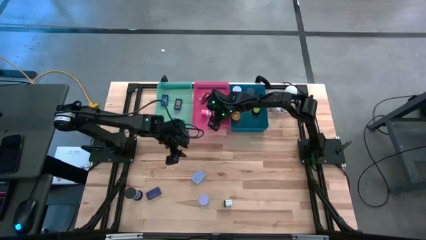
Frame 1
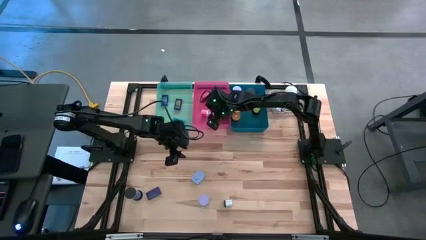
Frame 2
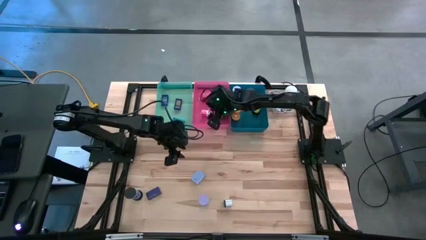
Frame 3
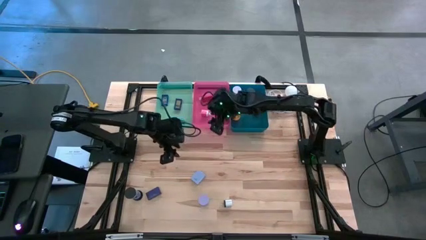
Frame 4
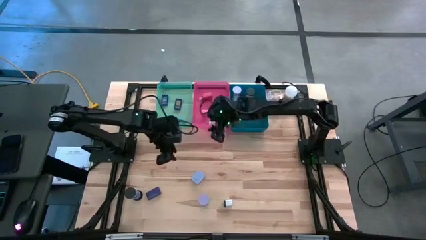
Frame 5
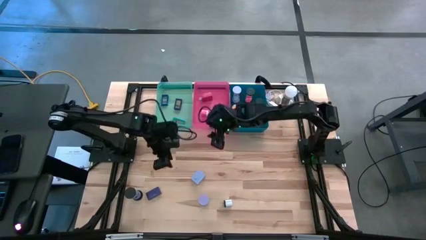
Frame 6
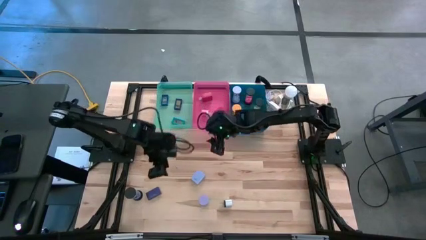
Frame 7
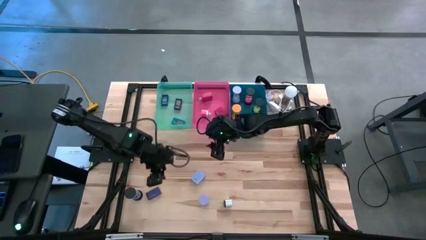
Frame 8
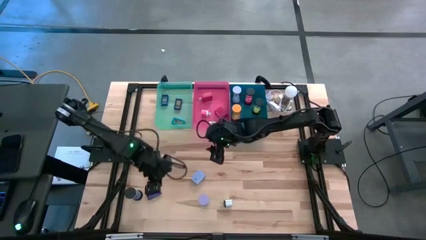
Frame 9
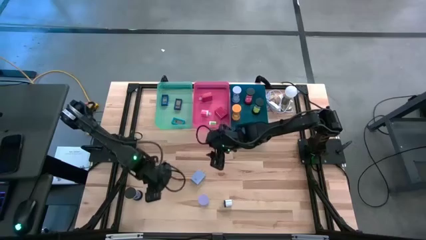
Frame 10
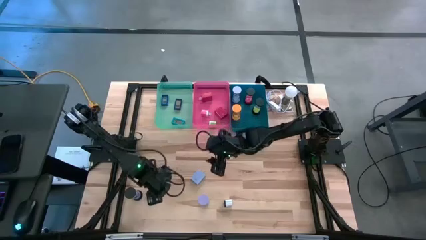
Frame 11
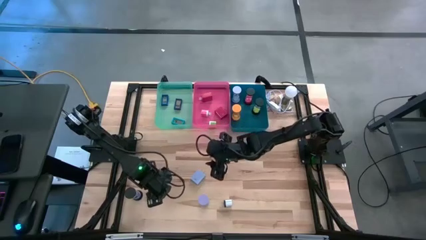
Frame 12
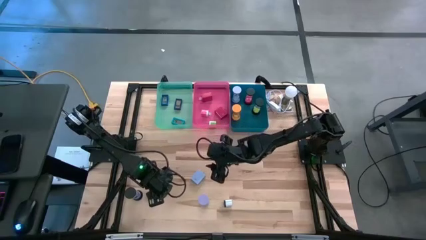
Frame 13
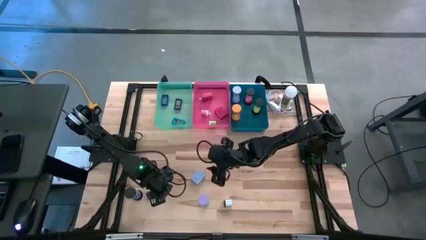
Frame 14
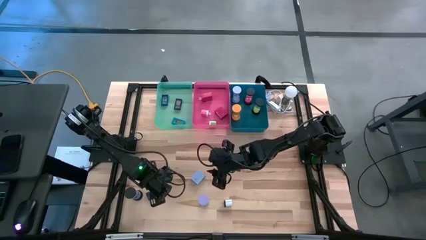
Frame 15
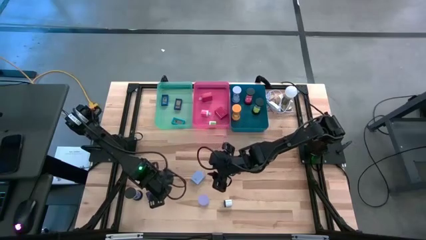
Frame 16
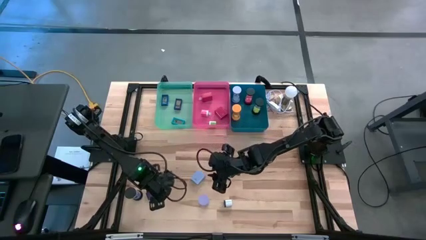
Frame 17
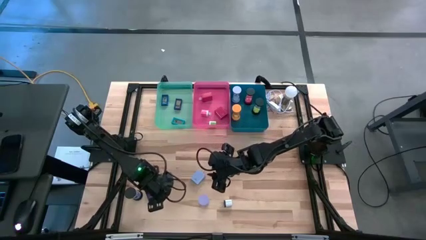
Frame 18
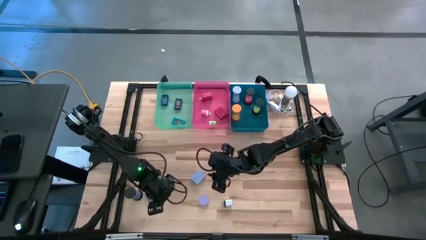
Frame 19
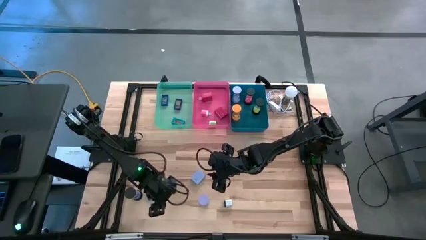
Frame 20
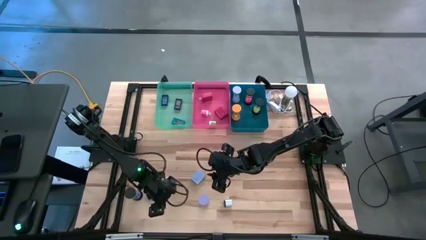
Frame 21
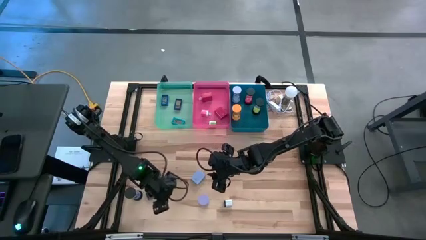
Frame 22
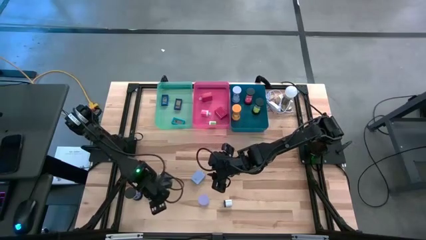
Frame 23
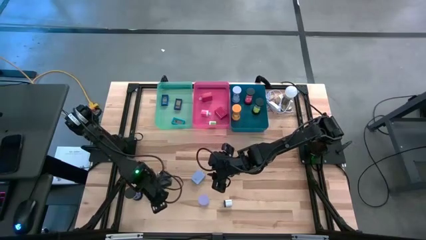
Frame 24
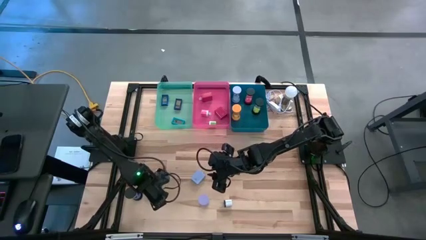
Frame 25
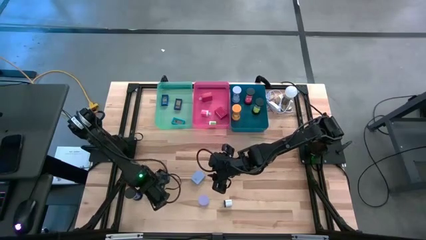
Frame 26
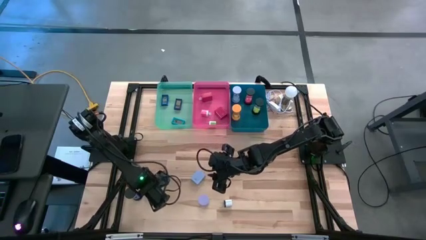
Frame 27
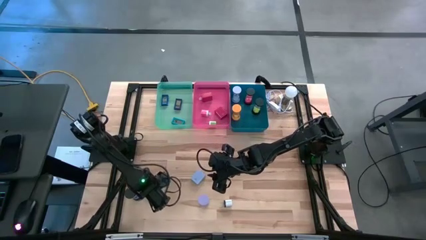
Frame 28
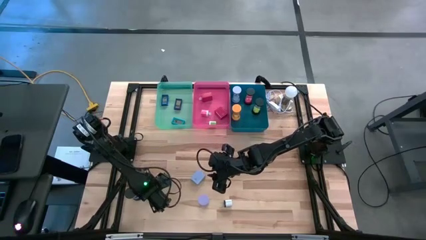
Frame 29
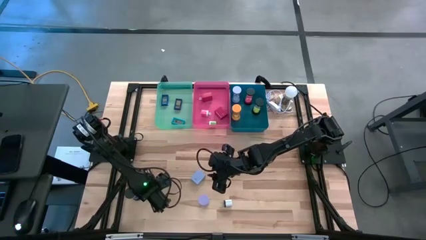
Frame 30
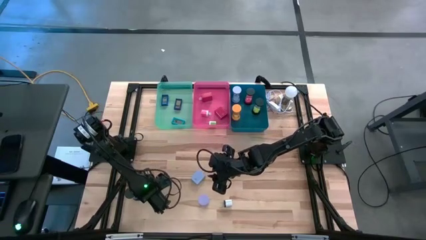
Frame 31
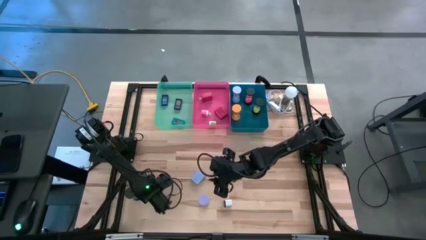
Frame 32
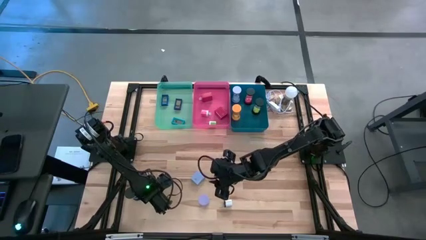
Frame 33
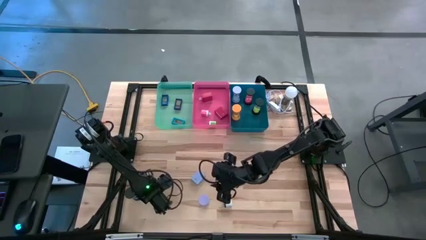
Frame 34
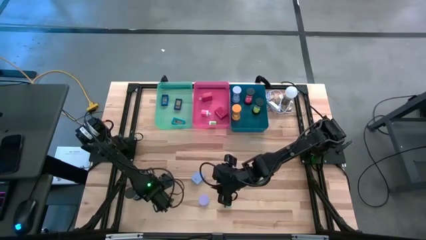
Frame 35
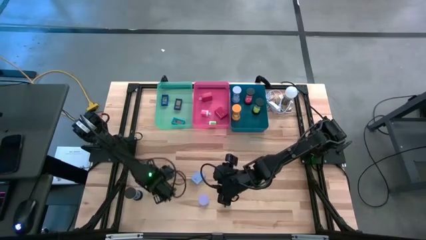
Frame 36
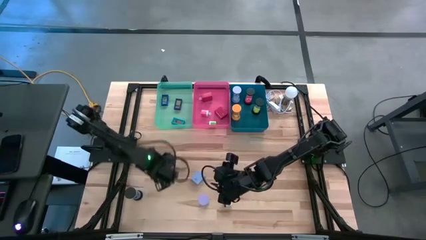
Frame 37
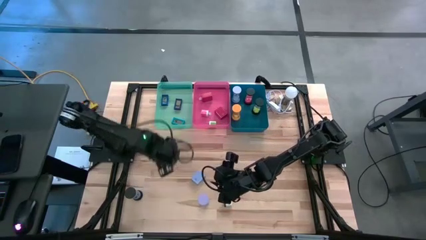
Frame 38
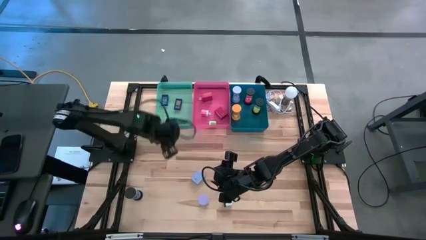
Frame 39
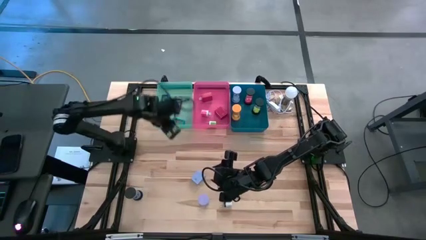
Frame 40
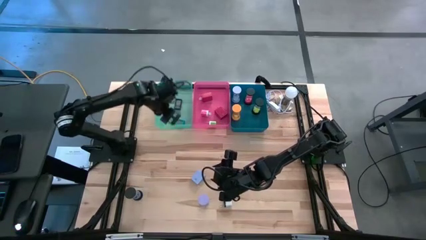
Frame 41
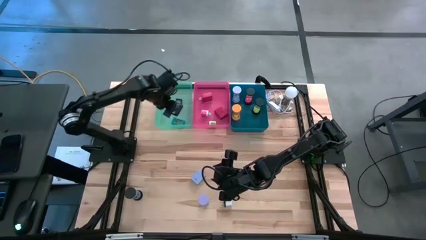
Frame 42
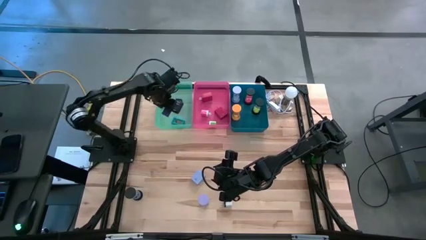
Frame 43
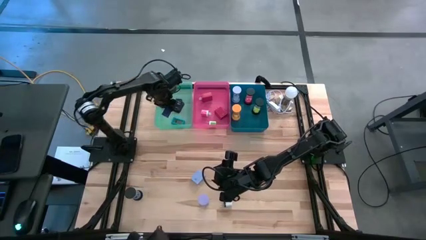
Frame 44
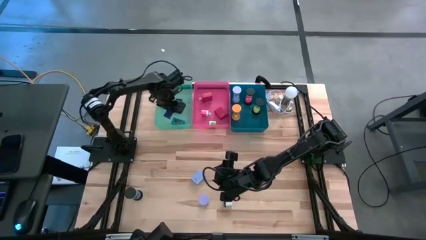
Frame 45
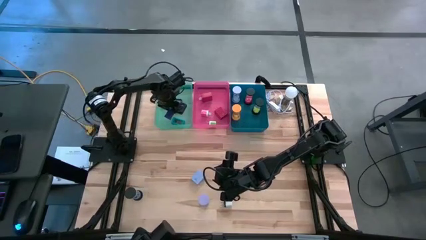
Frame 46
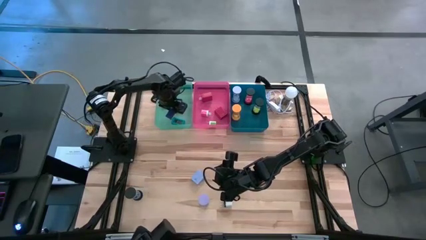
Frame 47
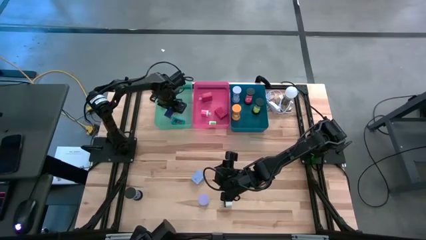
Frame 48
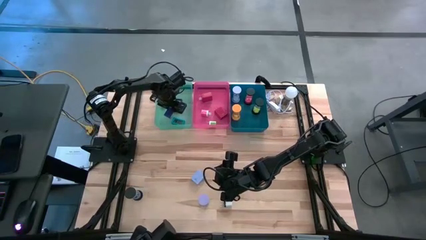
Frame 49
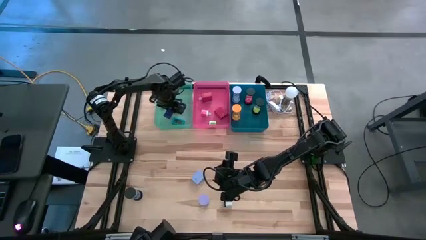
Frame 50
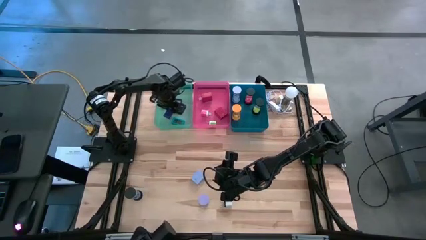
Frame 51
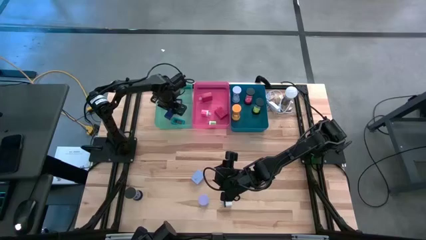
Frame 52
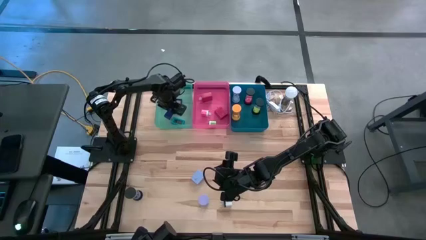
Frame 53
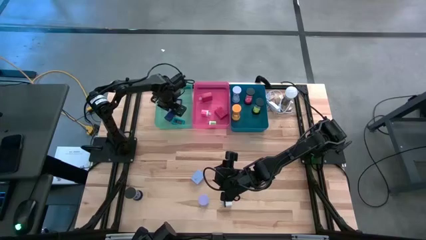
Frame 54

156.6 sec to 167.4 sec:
Task: Pick & Place Office items
Put the purple digital clock into the light blue bin

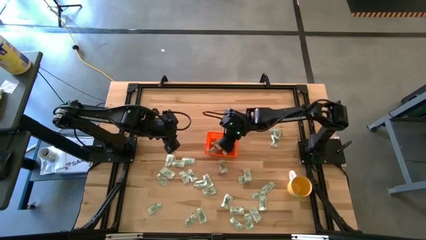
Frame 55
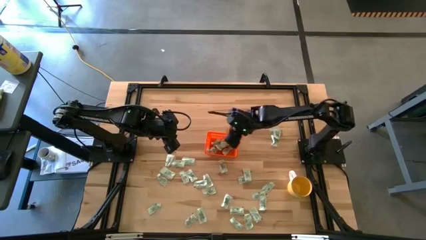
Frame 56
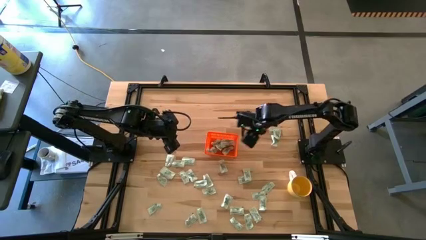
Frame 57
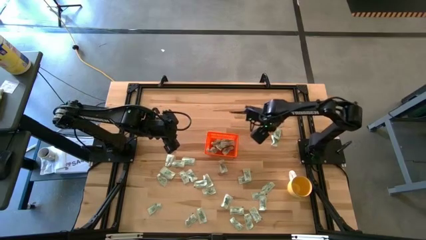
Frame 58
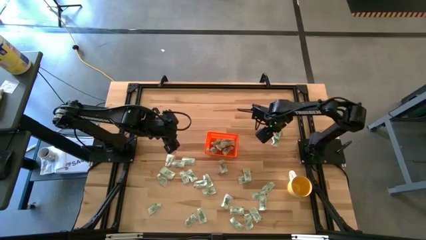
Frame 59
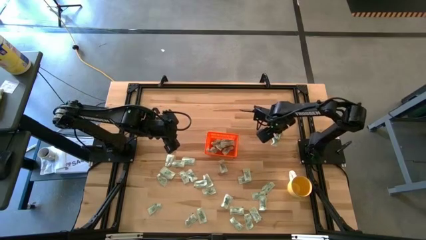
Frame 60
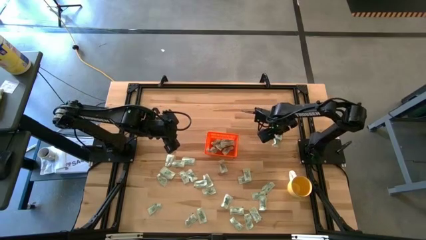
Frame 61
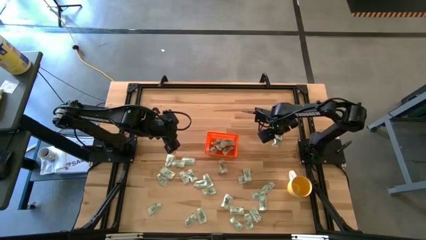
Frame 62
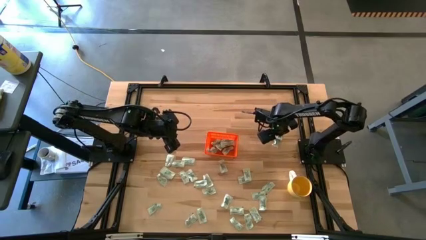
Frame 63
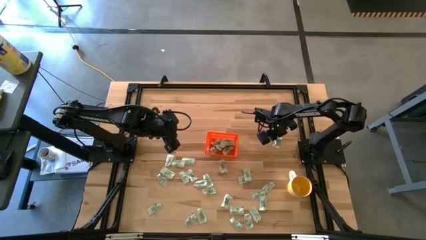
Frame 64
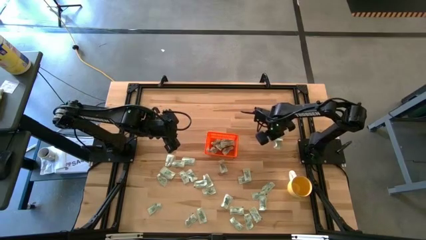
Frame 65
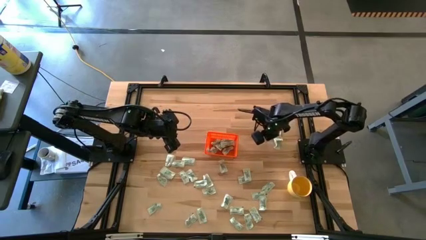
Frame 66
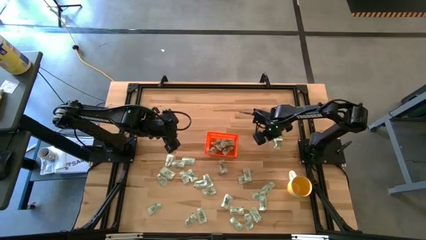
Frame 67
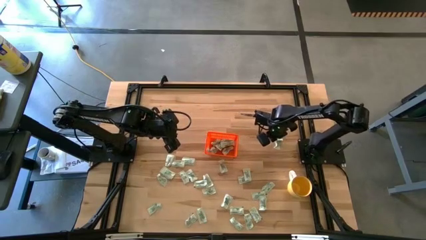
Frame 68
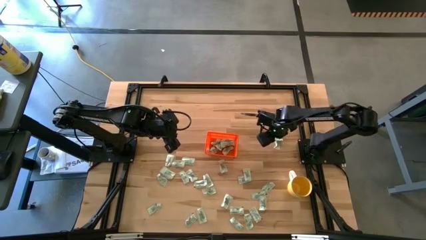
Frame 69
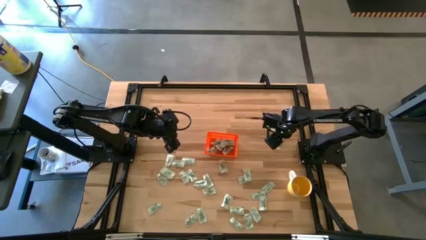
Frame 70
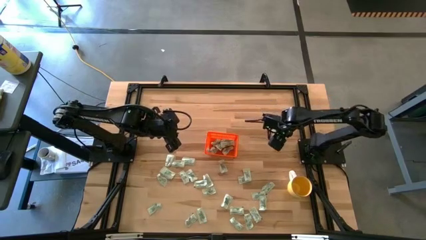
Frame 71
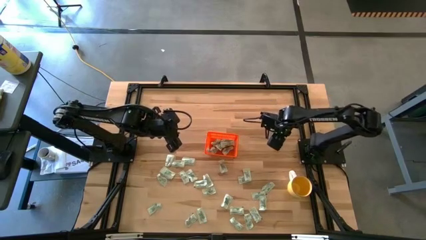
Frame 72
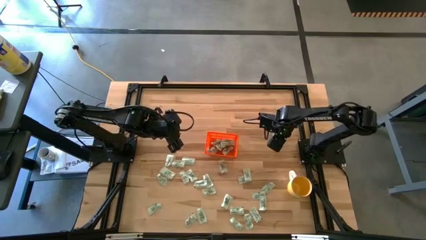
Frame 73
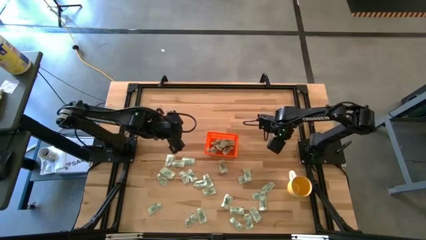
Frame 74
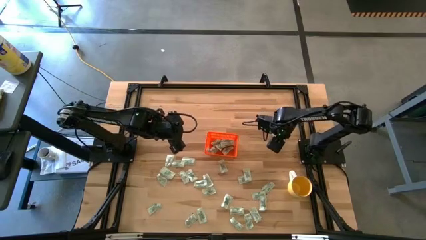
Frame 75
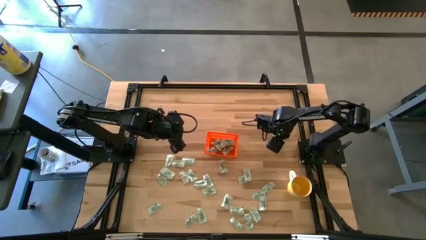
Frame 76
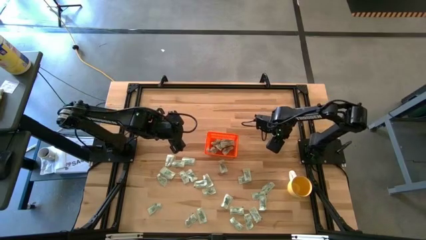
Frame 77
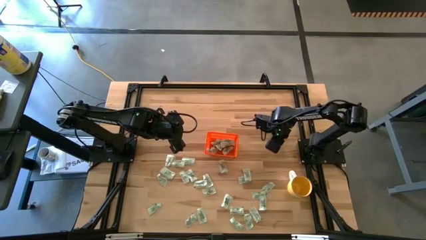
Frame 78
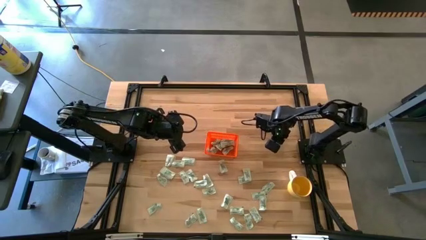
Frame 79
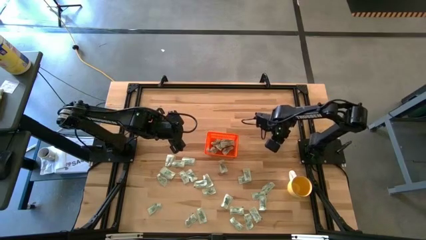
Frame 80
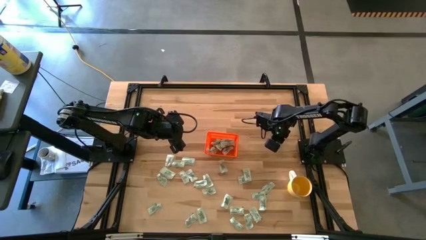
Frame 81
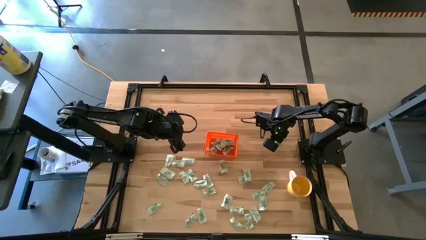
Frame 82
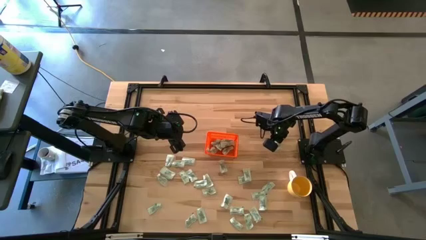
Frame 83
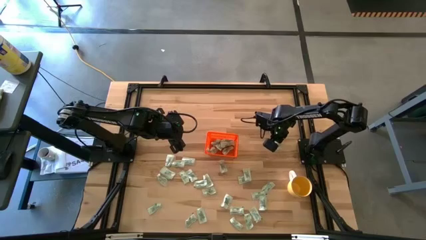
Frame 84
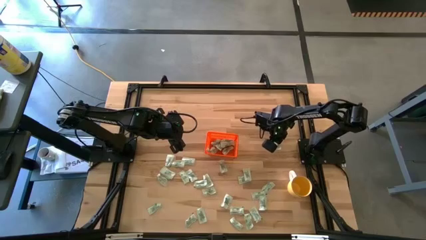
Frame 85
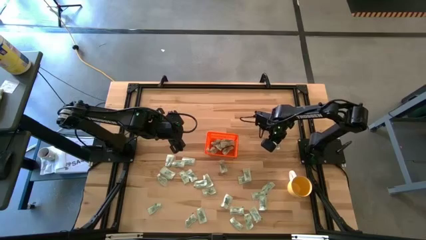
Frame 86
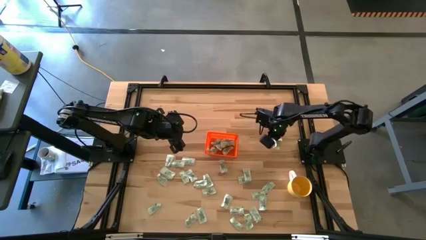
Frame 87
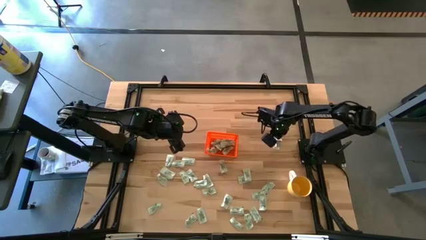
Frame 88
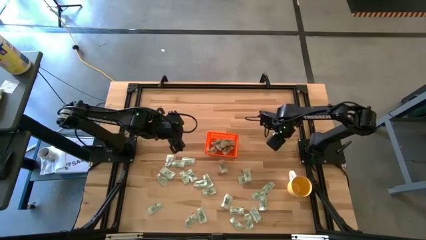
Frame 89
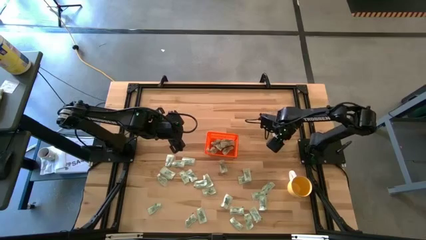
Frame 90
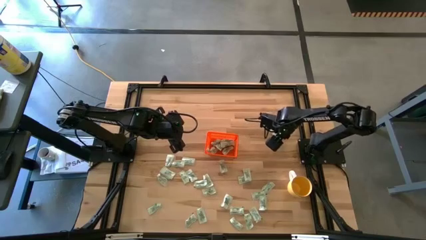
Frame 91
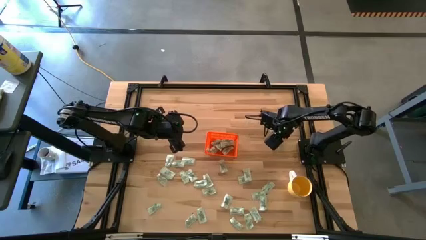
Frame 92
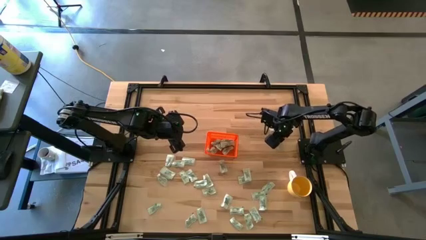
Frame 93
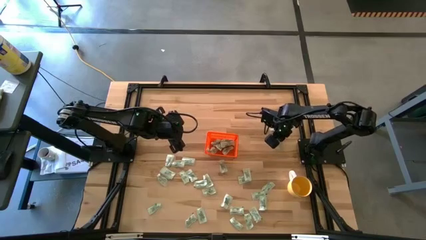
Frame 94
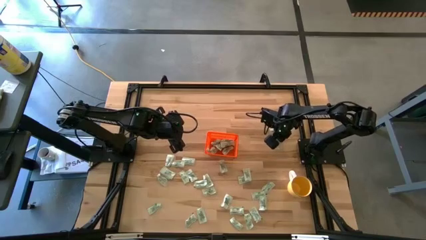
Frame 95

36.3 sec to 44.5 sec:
Task: Pick and place Stevia / Truvia into bins
Put the light green stevia packet into the orange bin
